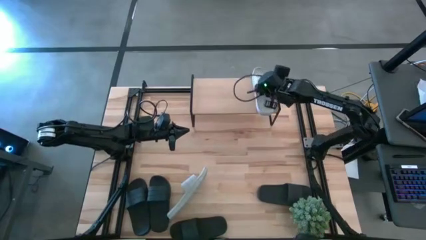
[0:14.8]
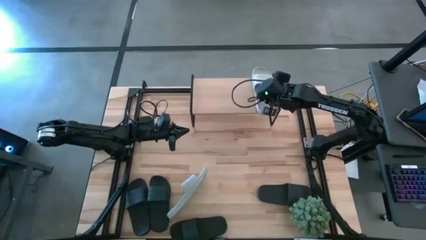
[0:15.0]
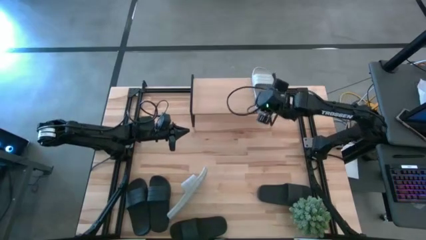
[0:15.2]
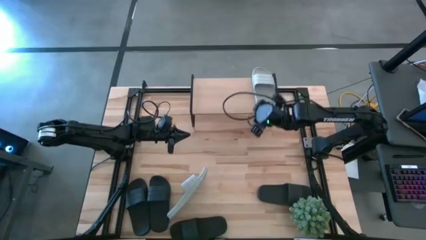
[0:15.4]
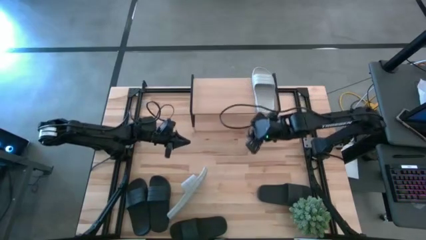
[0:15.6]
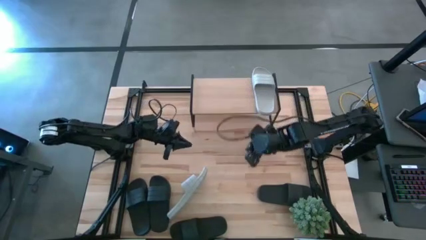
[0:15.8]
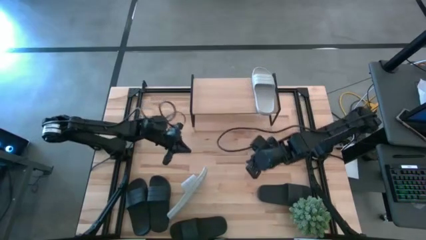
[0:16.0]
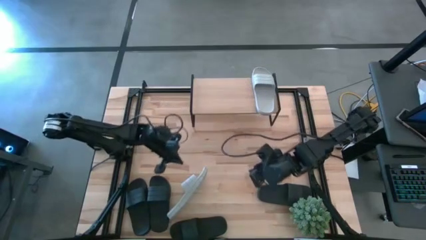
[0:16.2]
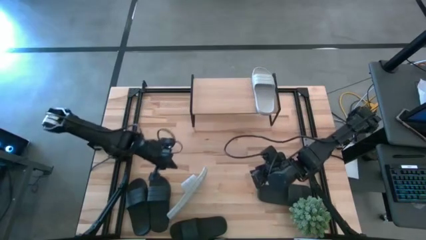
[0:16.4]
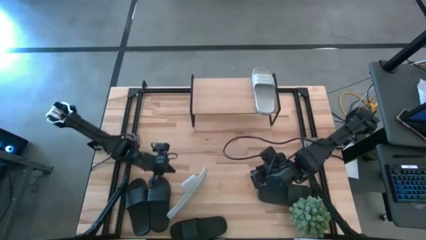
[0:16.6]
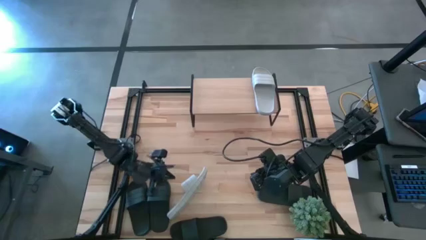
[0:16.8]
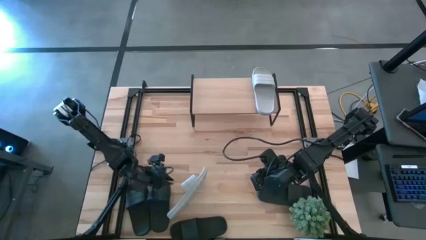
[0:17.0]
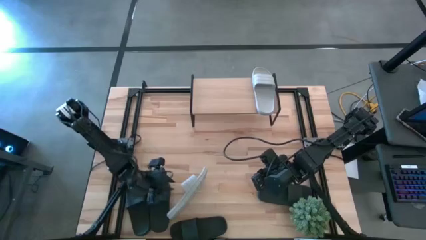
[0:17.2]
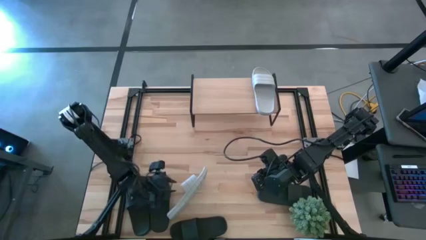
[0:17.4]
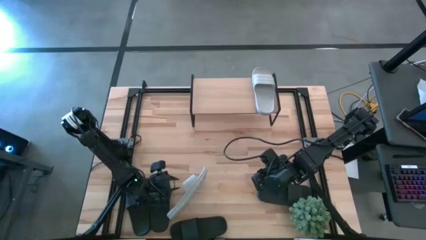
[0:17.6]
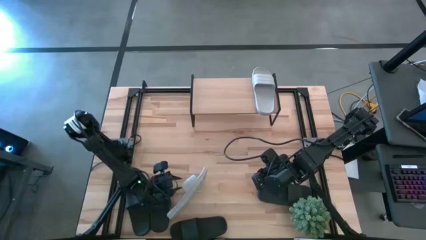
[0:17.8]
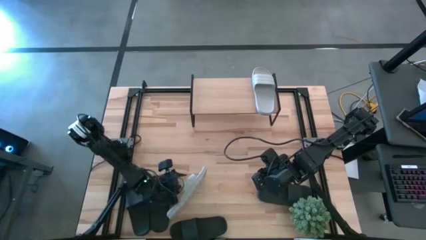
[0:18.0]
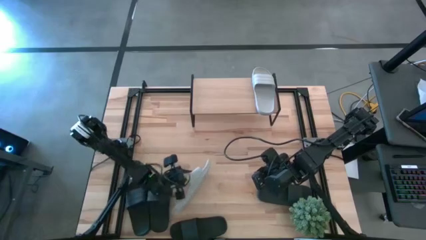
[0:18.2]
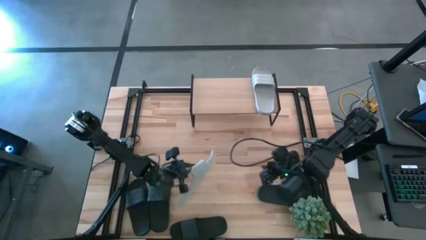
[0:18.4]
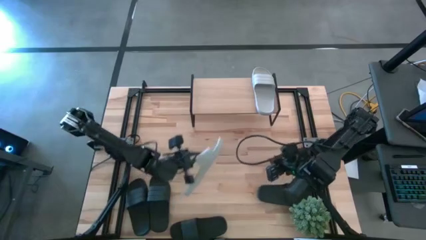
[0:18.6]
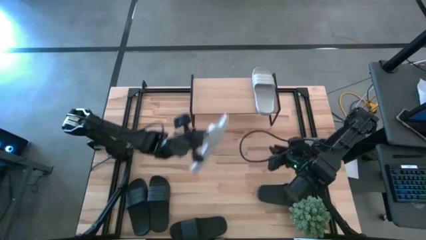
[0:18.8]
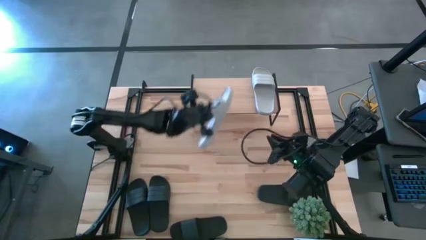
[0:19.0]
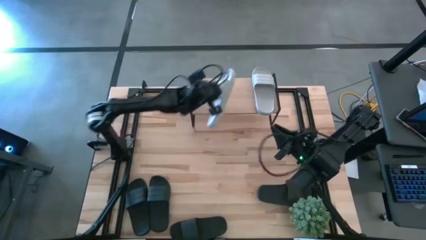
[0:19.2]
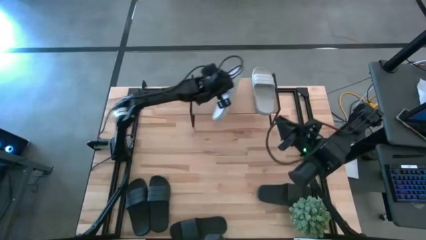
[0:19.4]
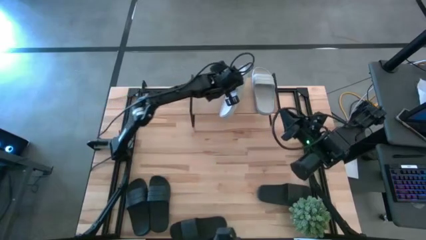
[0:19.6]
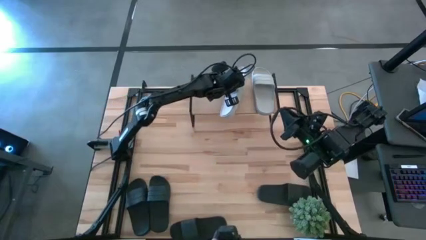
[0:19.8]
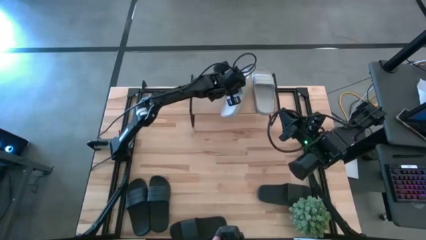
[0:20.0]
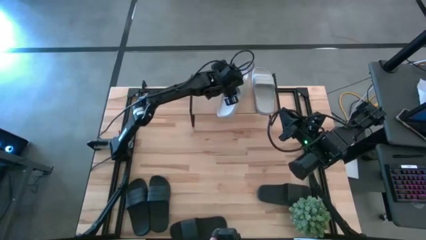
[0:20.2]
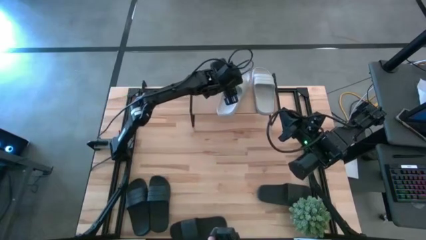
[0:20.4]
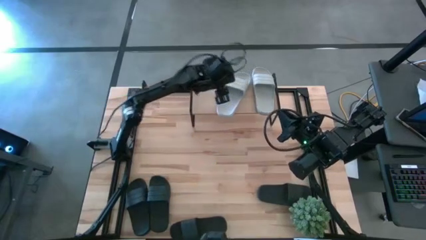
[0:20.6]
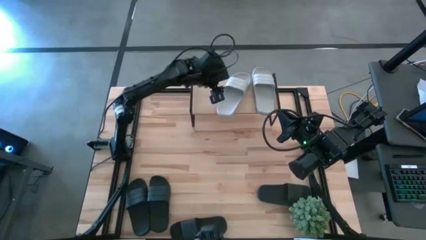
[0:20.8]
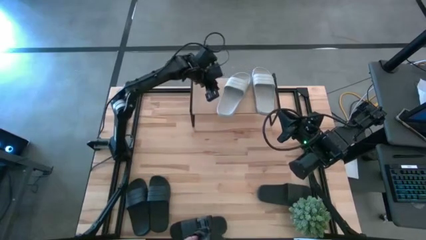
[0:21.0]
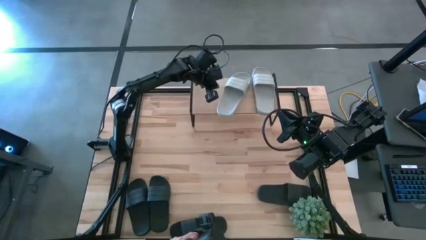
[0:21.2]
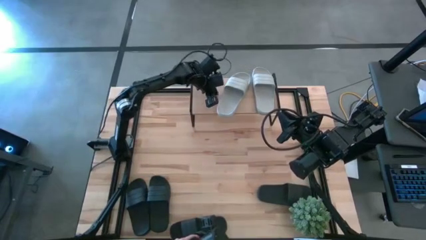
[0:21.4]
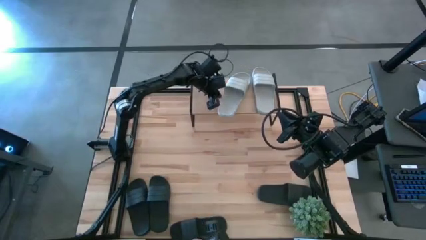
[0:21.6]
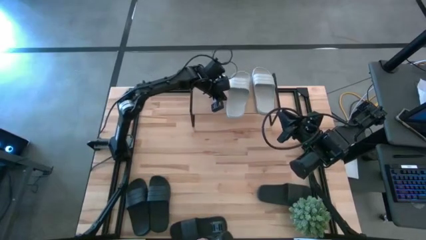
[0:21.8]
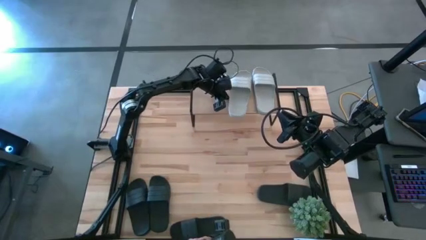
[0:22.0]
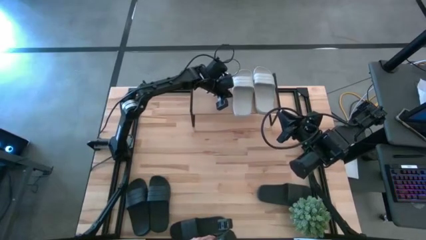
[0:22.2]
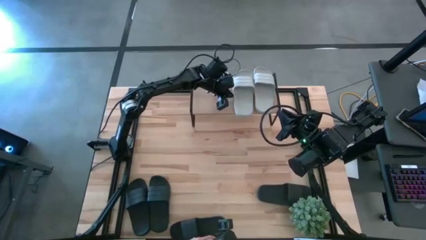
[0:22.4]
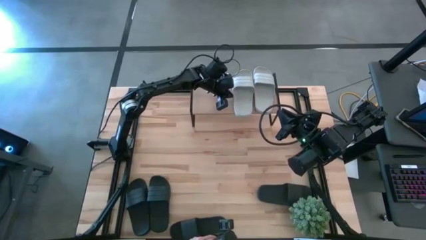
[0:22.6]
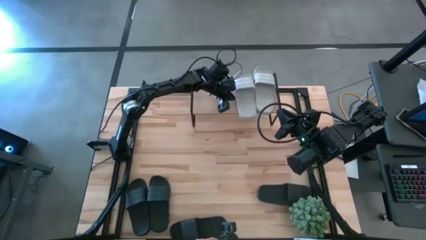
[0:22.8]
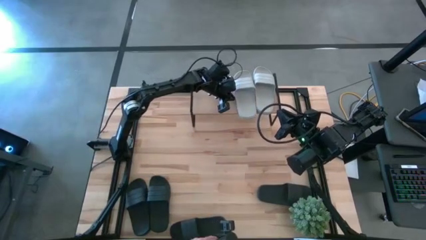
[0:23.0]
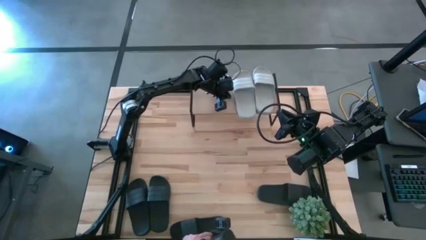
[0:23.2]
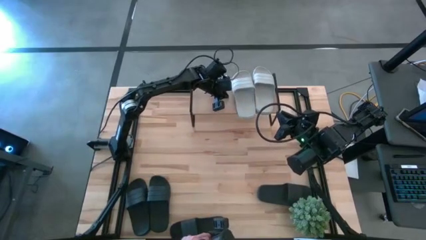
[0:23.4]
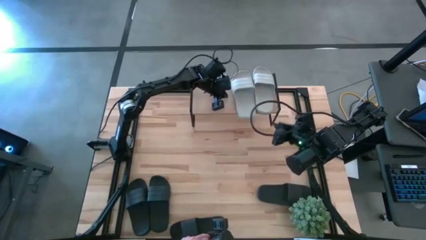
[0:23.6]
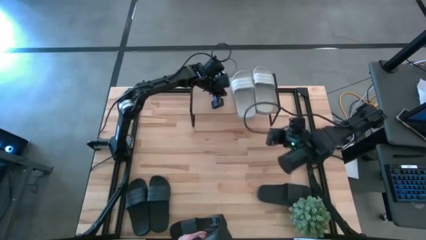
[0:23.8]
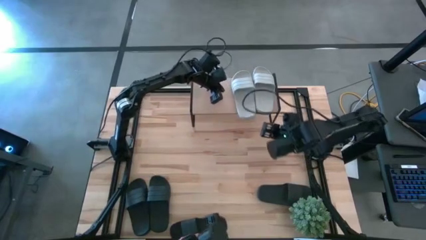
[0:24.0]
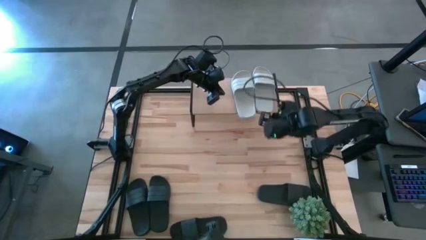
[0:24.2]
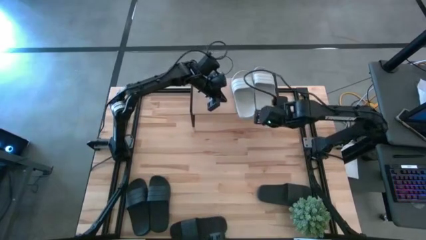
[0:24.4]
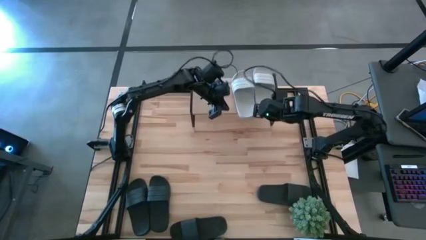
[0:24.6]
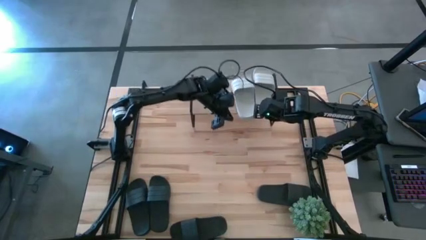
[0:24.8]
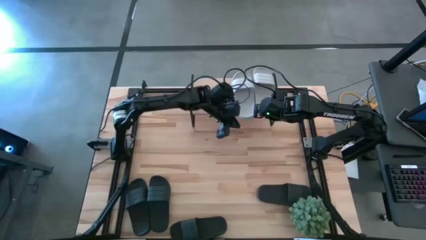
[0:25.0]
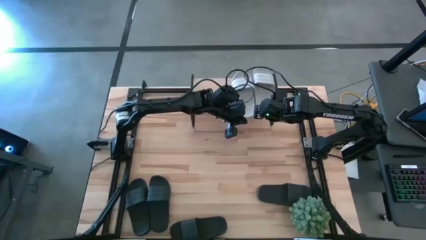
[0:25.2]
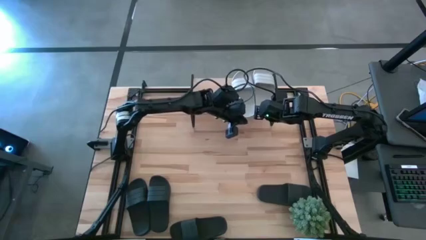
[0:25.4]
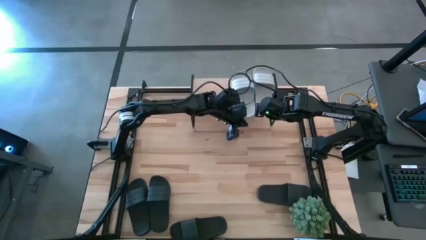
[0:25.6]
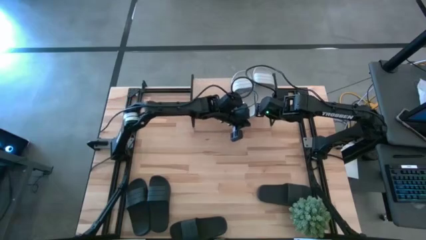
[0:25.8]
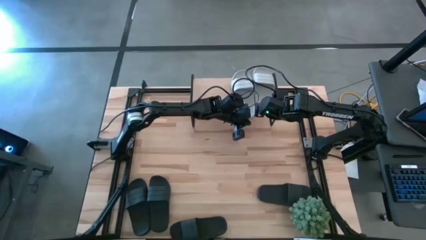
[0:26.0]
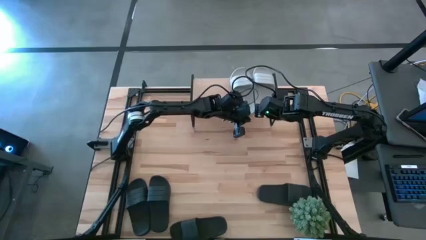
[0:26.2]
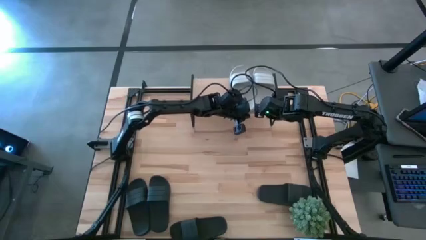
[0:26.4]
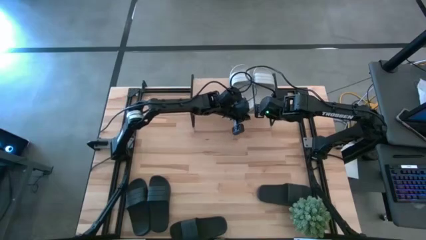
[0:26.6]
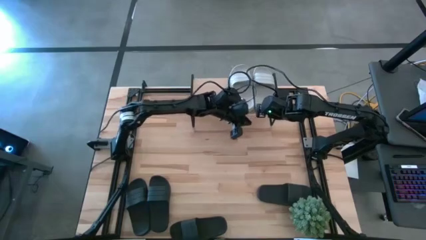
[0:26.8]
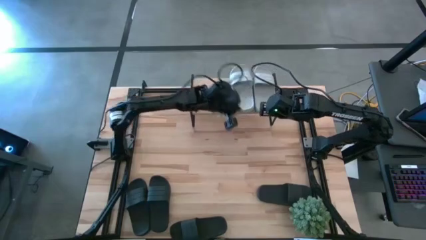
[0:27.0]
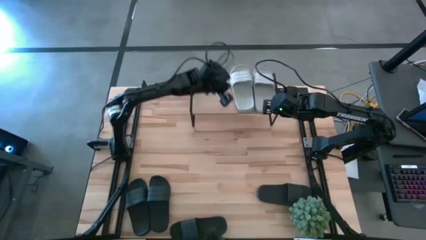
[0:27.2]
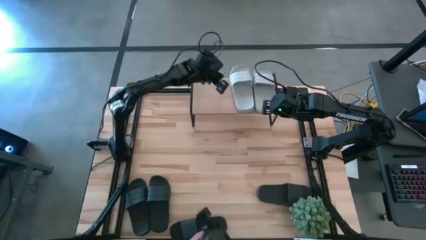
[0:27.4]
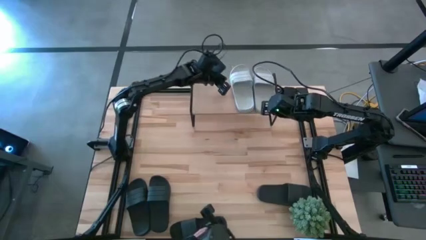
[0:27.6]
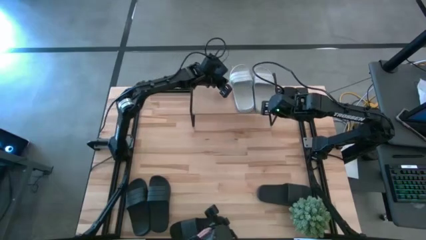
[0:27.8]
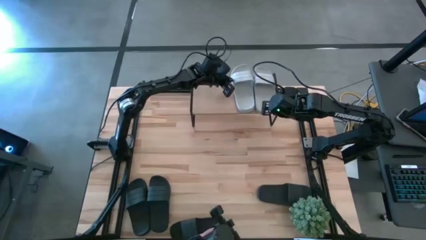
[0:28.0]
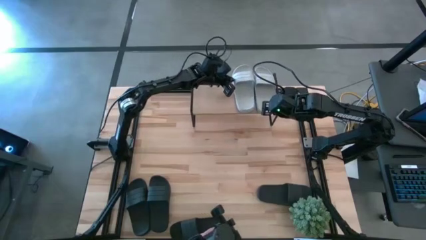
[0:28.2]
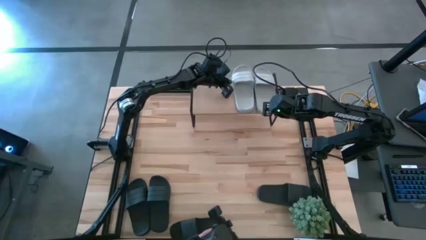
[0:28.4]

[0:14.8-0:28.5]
Task: Pick and place slides into the shelf
Put the gray slide on the shelf
